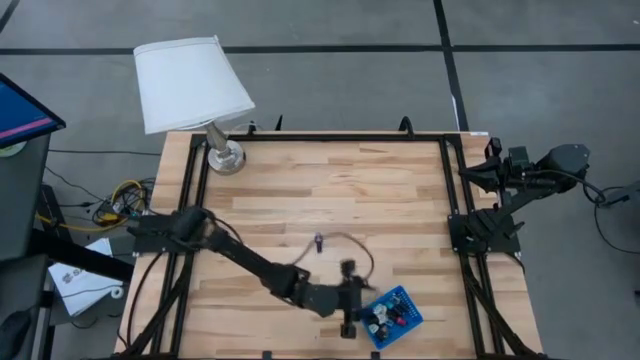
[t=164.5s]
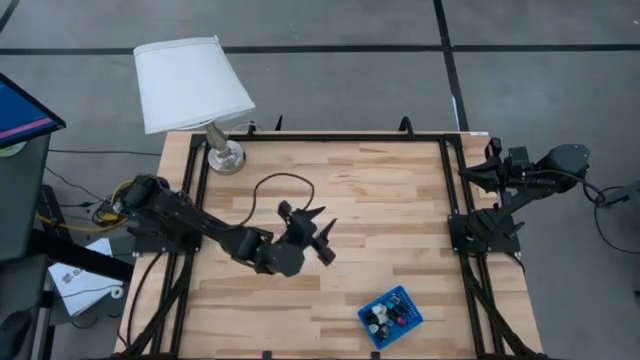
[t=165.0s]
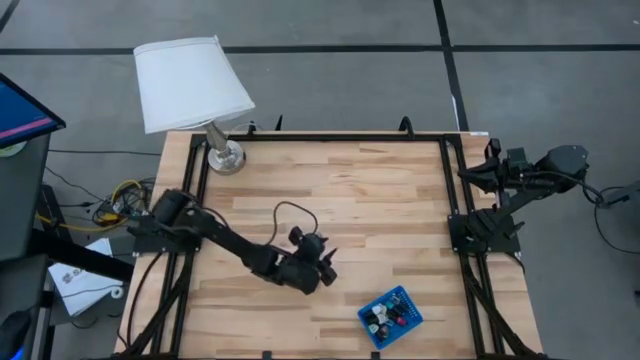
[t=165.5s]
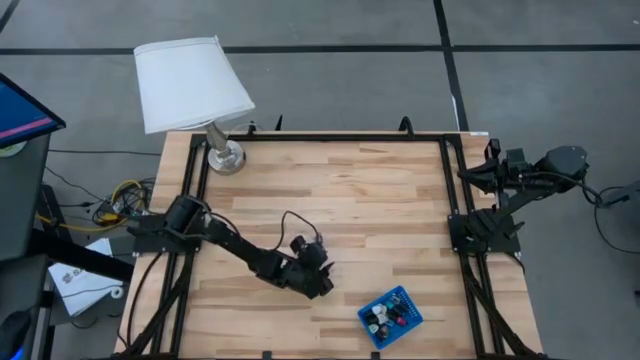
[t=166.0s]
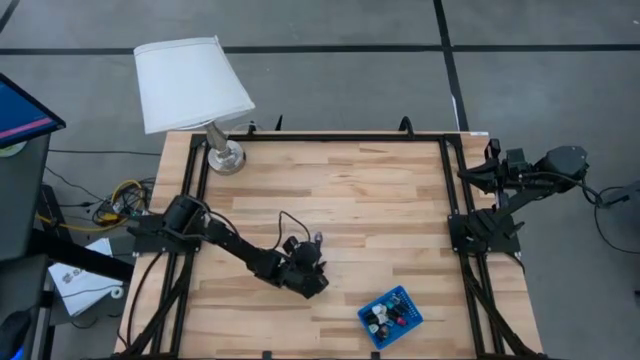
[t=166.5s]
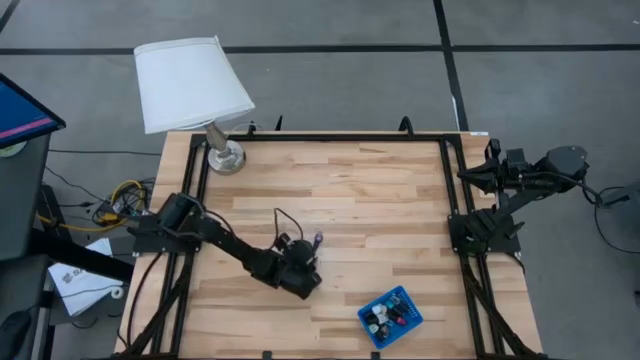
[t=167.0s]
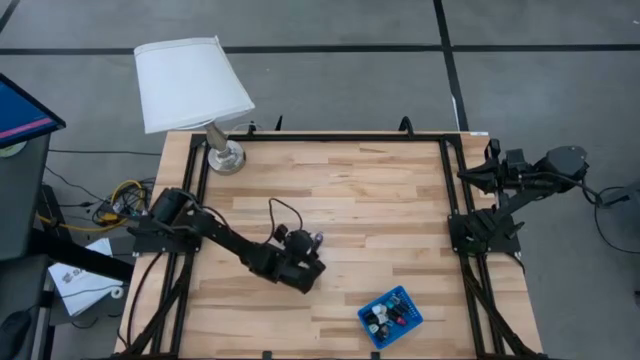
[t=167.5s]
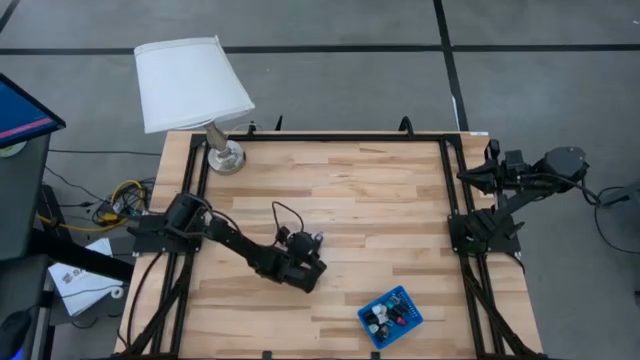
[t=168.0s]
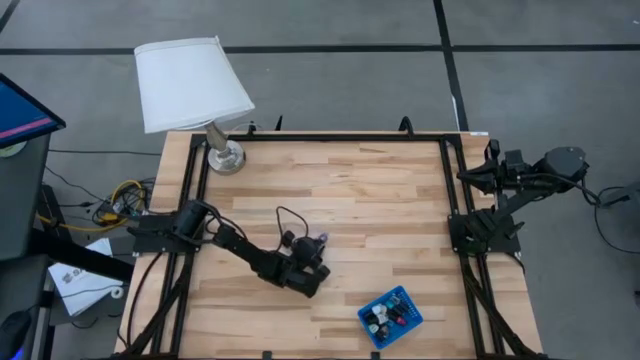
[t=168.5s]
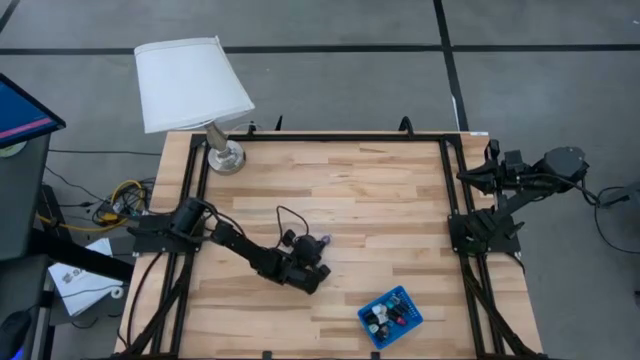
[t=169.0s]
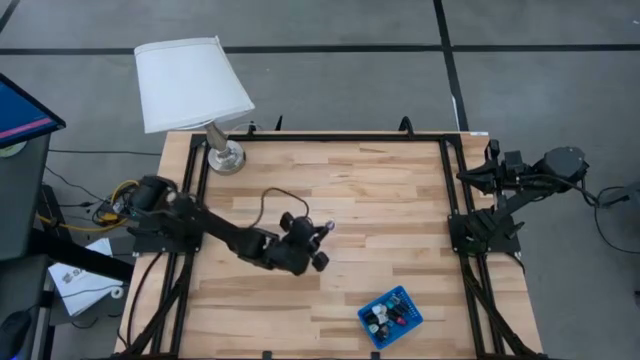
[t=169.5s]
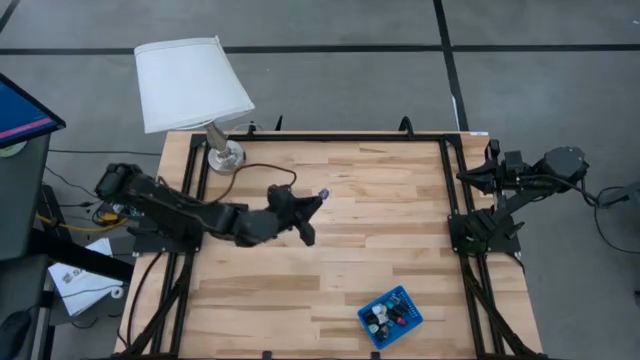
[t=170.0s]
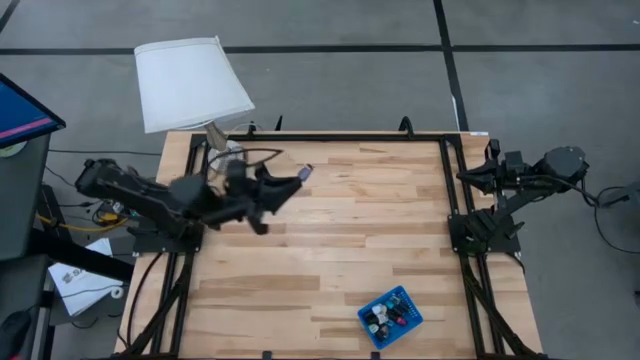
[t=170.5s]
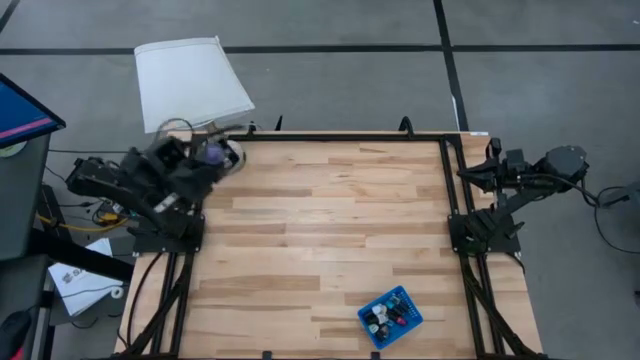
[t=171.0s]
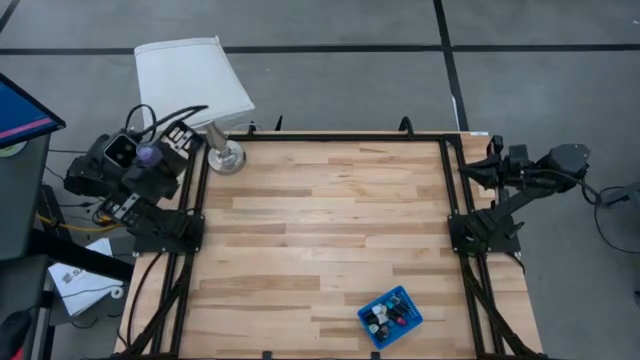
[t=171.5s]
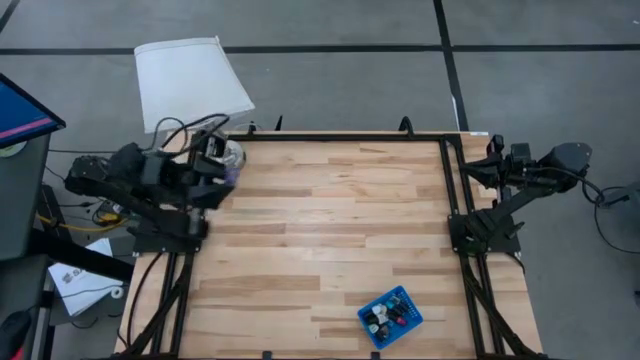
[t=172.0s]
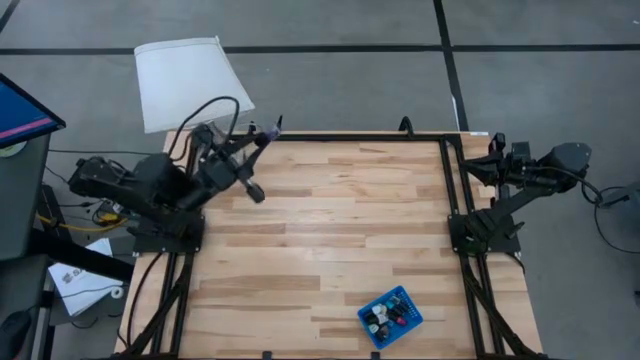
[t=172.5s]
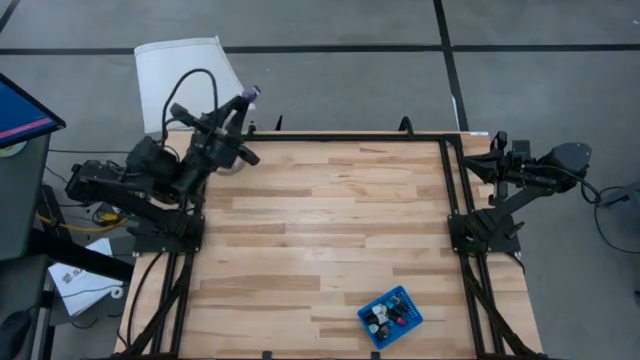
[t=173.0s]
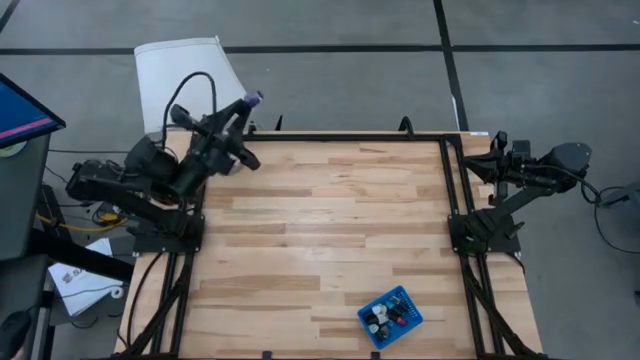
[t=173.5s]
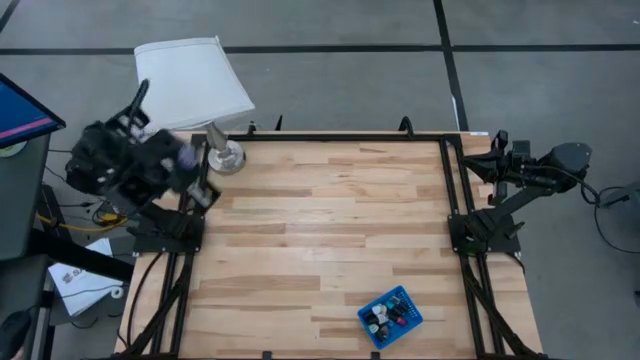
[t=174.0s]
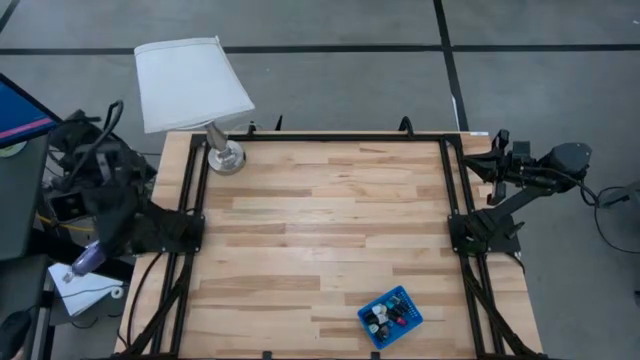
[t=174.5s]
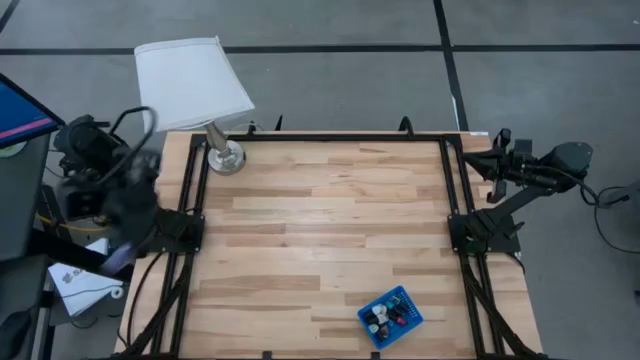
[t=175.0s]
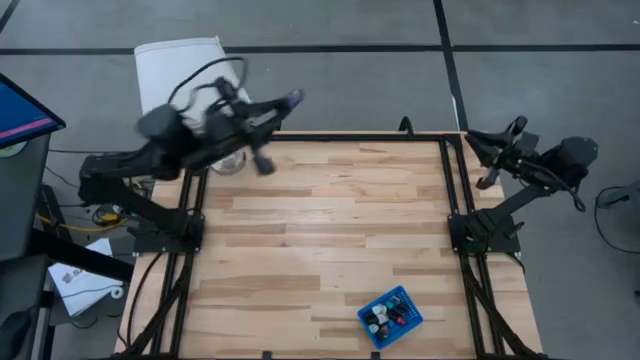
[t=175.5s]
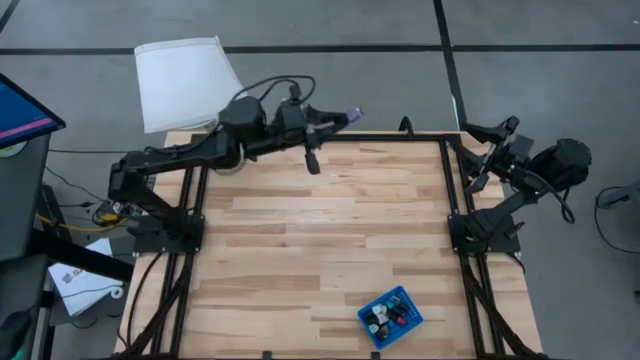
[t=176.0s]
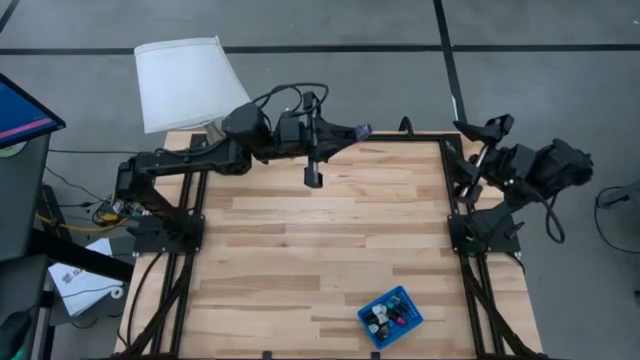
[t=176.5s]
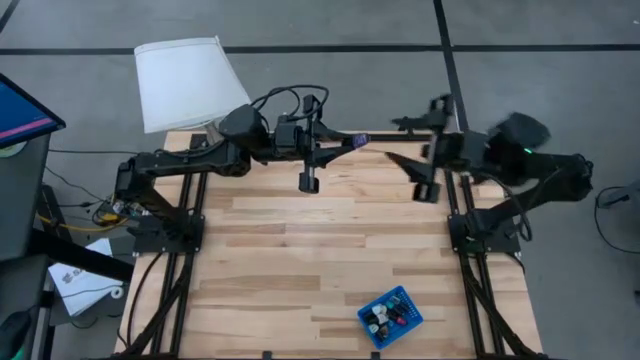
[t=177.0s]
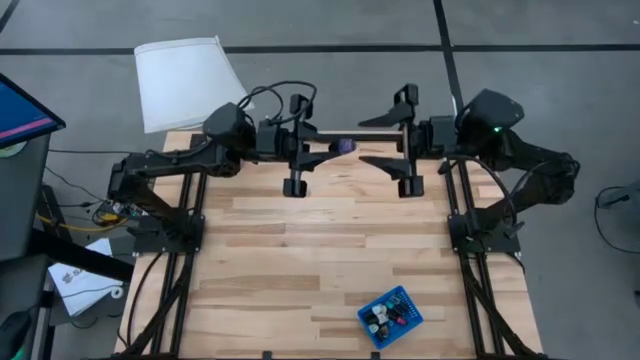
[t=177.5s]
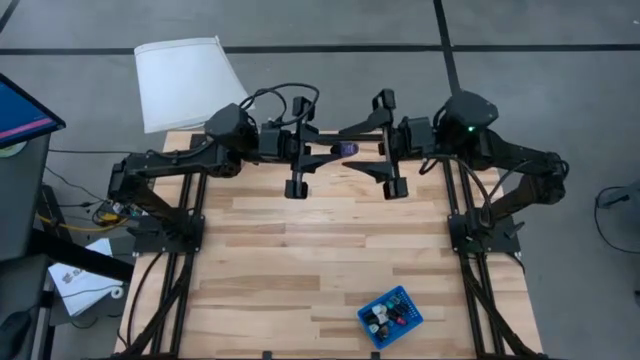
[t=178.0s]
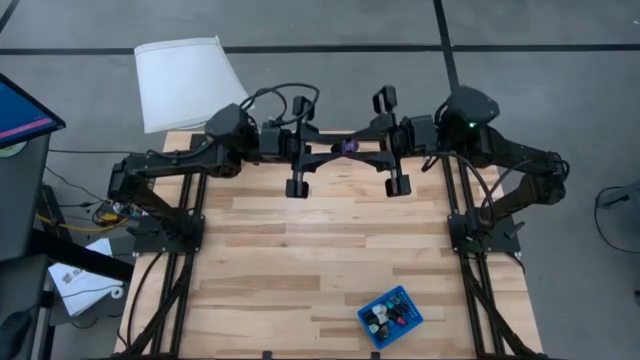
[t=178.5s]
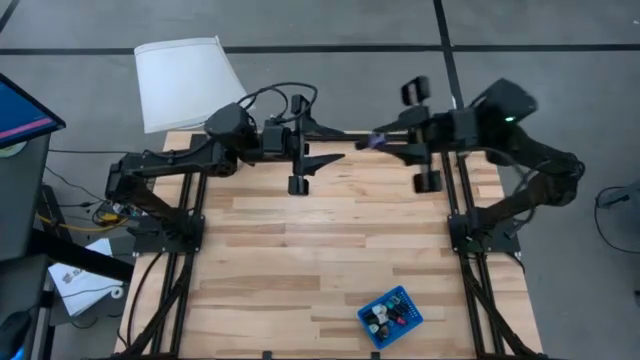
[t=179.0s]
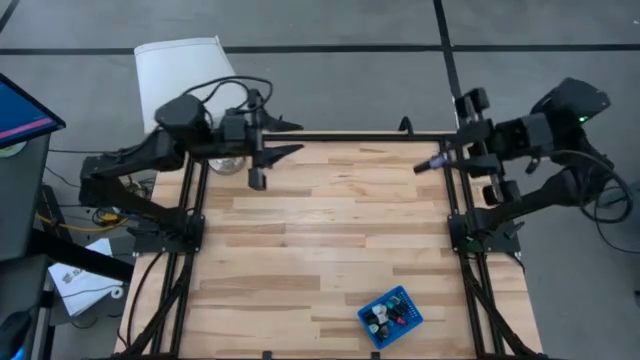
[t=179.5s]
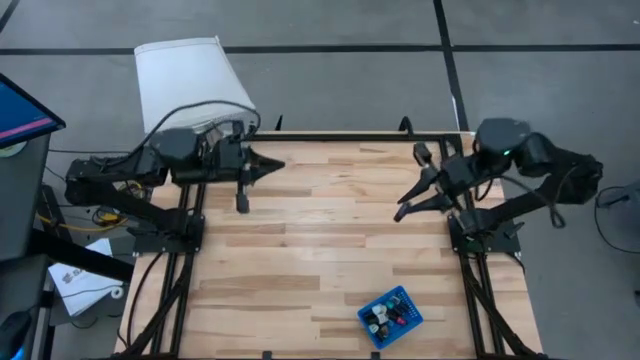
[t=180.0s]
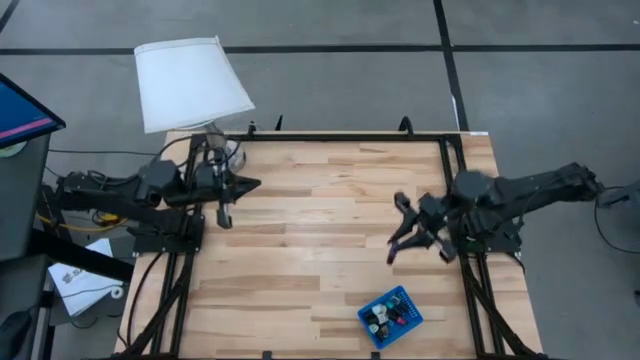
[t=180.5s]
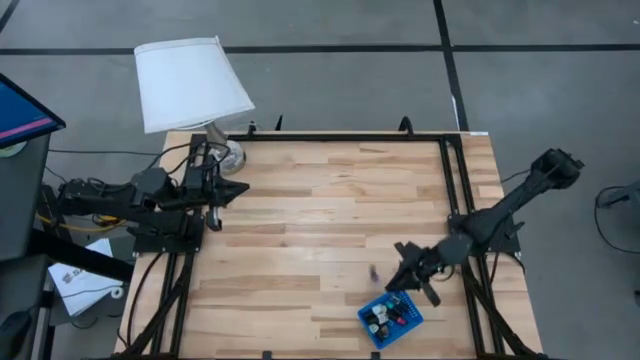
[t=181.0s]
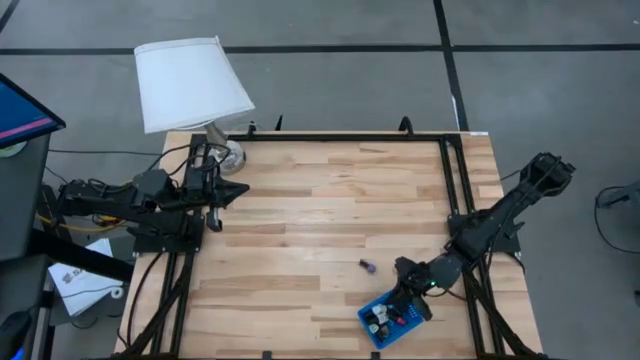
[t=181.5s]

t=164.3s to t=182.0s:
Task: Pick & Place Nail Polish
Put the violet nail polish into the blue bin

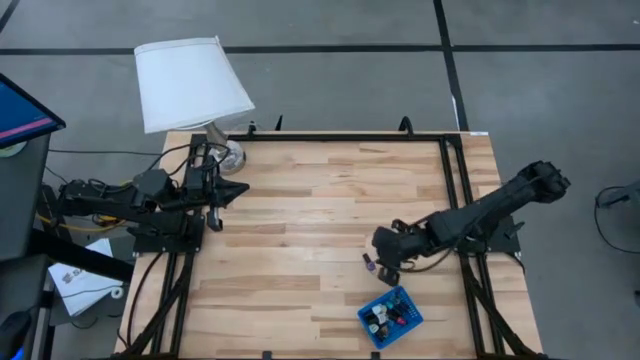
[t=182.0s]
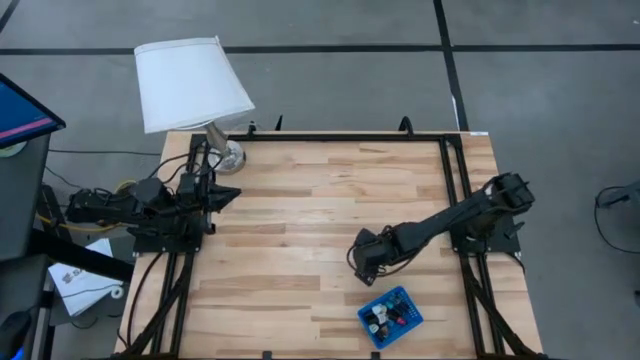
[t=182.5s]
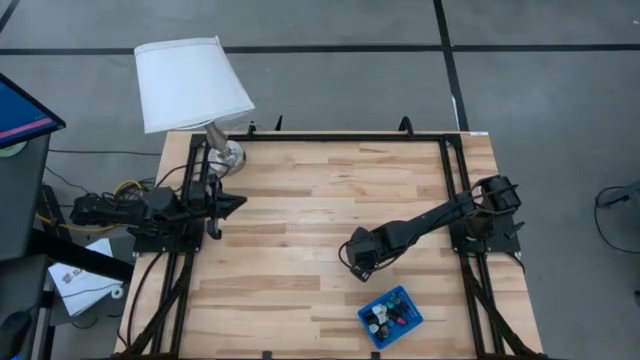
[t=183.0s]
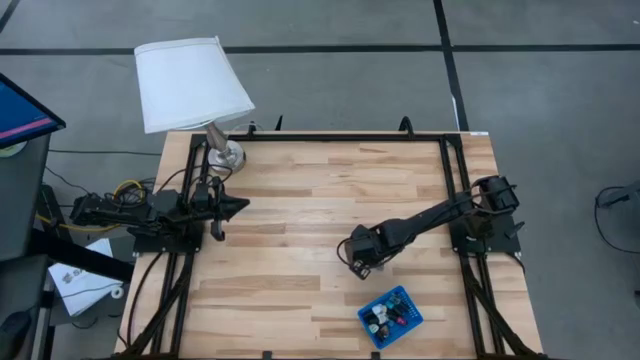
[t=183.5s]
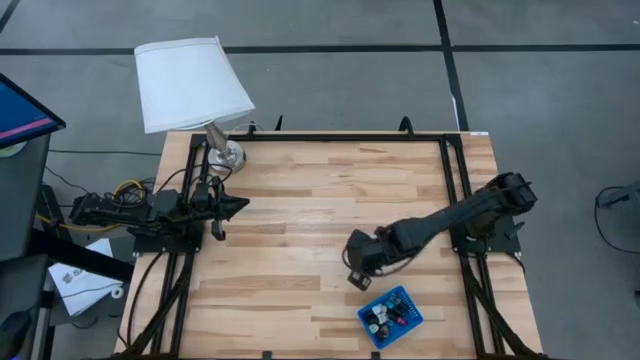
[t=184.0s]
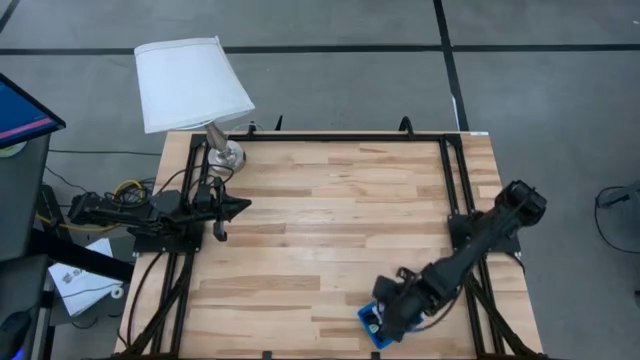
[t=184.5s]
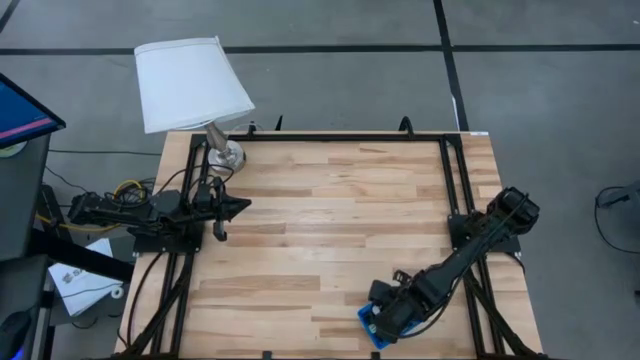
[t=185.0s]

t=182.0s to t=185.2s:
Put the violet nail polish into the blue bin
